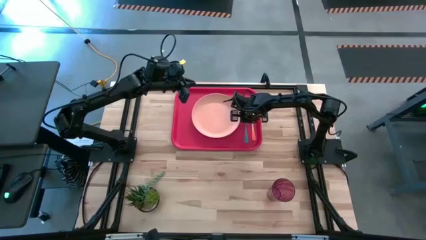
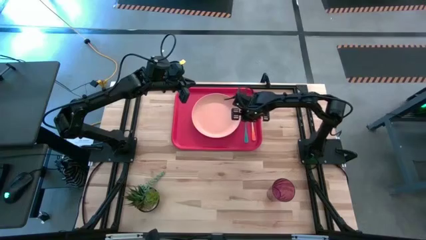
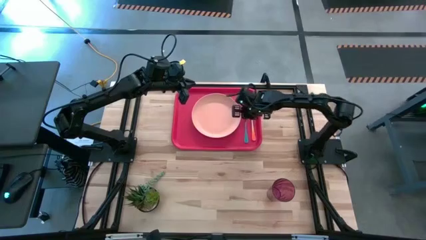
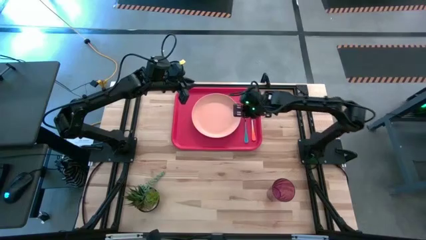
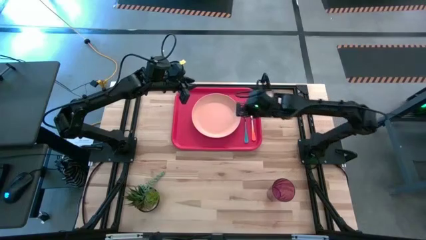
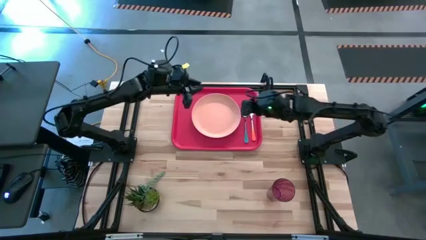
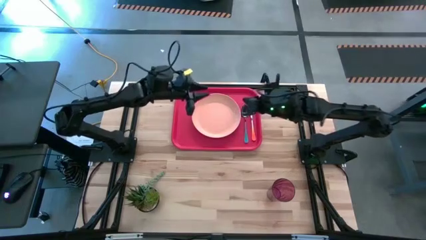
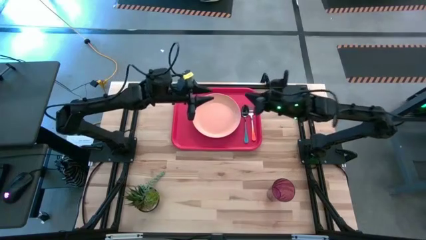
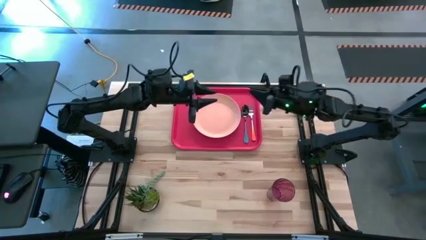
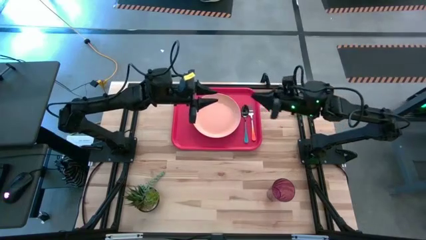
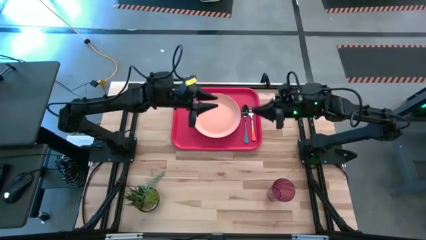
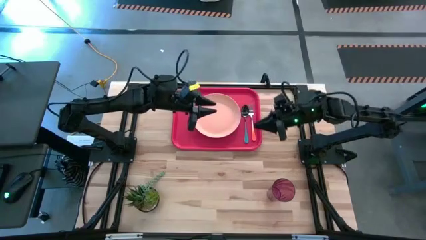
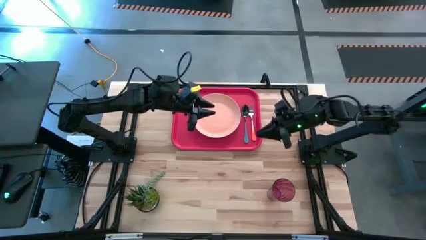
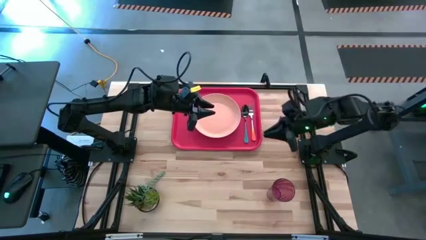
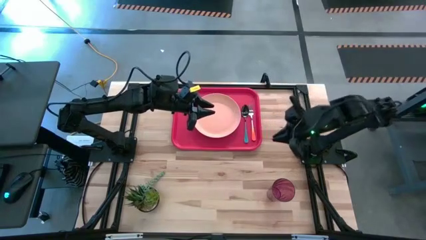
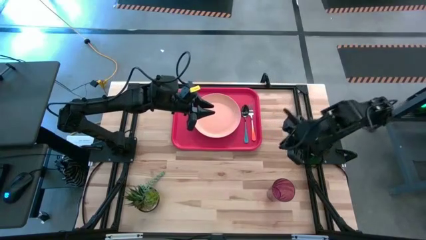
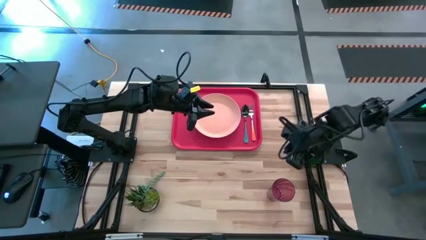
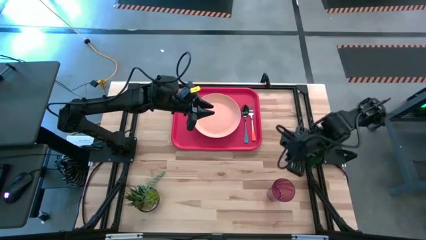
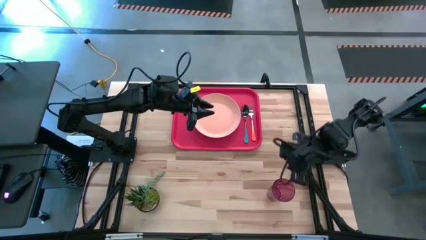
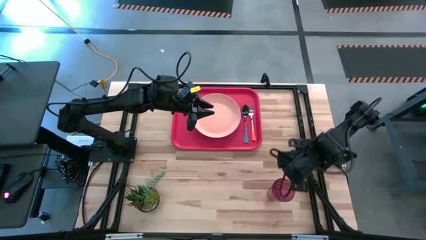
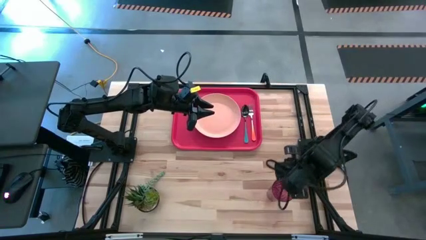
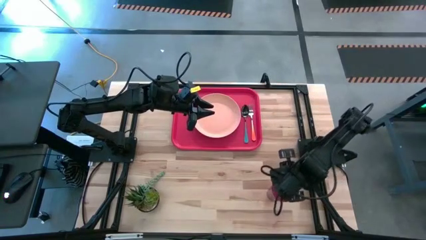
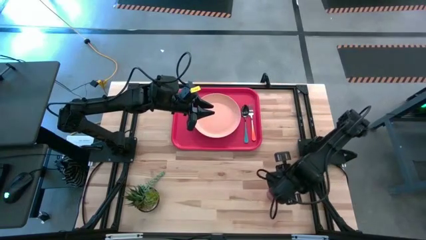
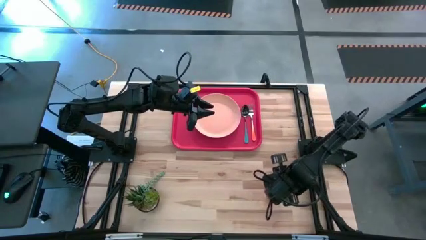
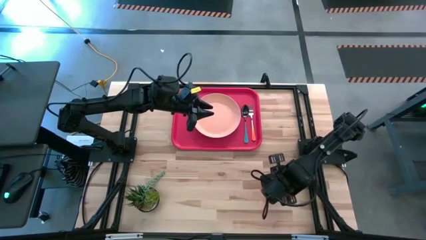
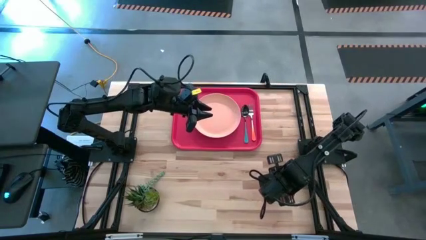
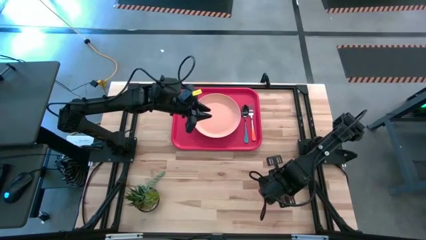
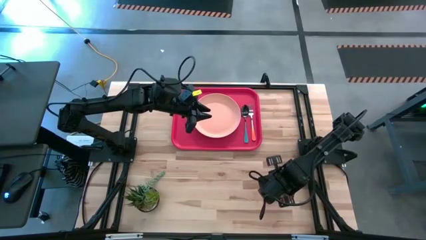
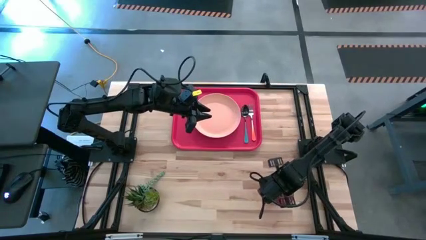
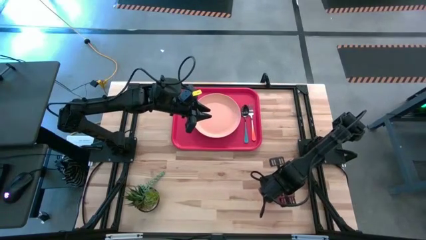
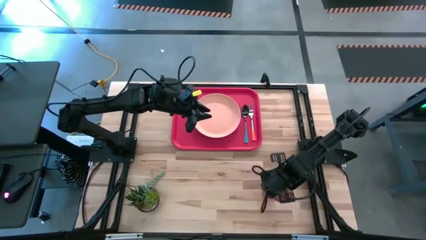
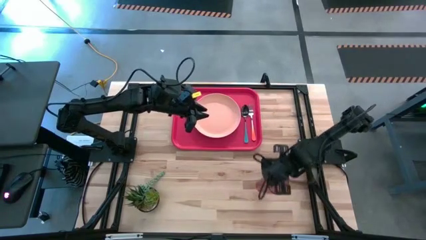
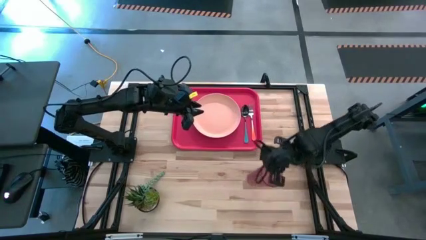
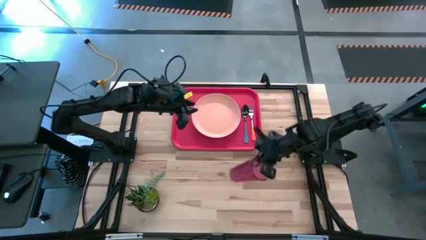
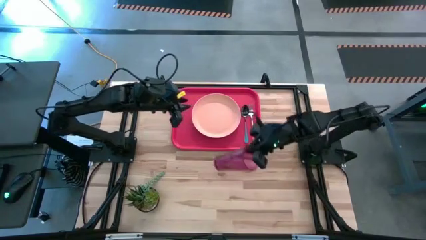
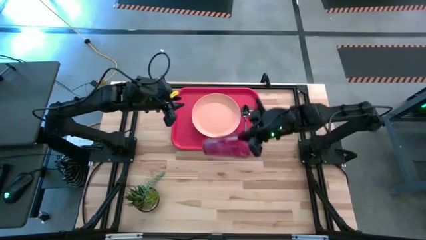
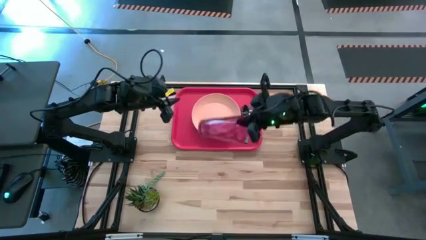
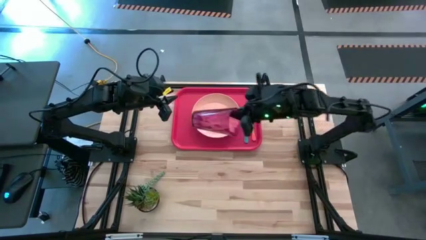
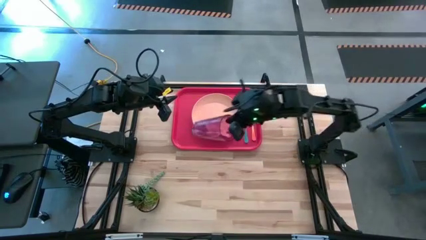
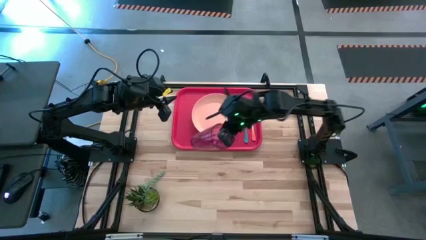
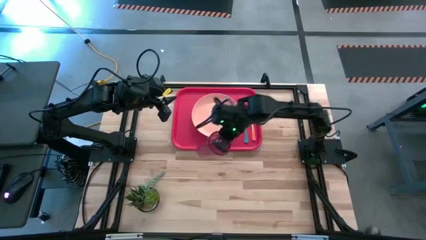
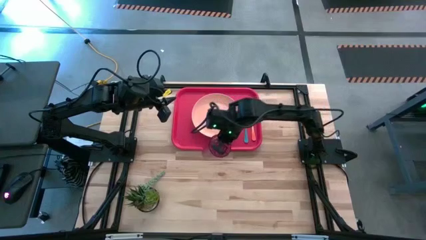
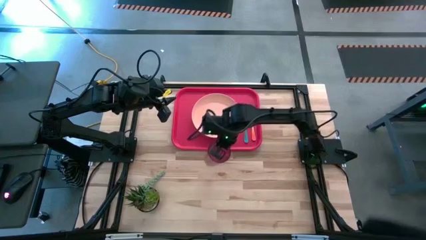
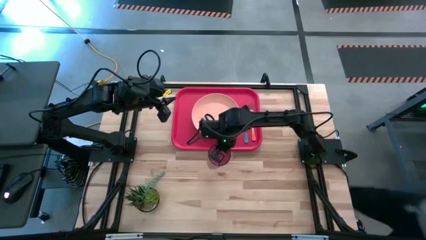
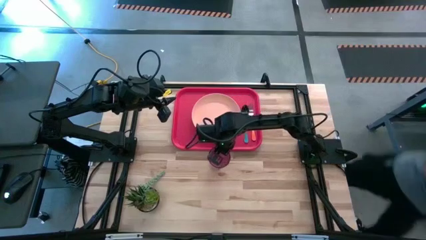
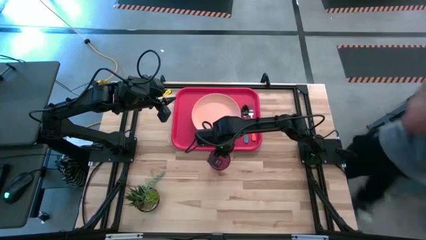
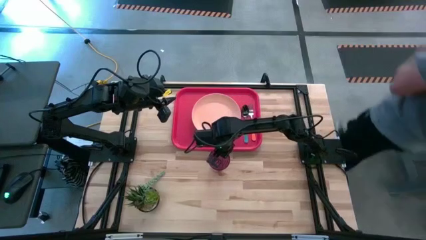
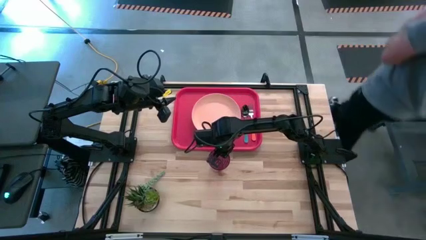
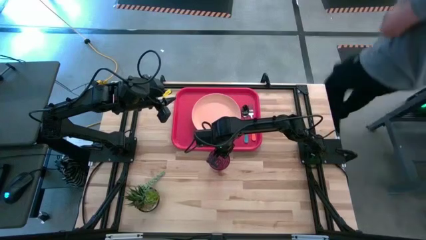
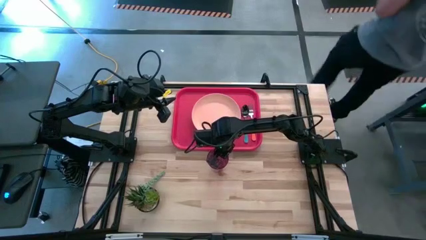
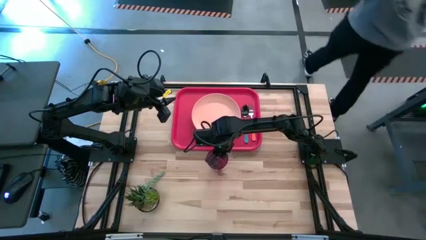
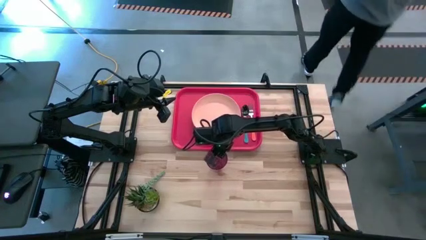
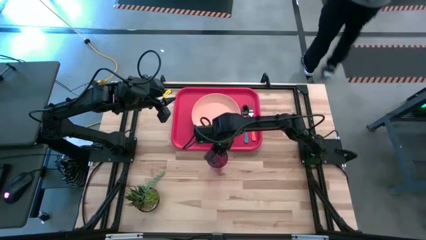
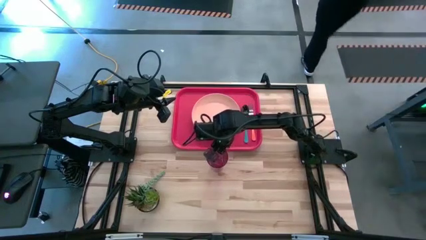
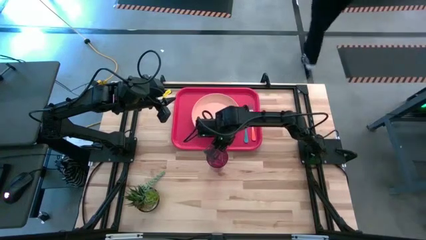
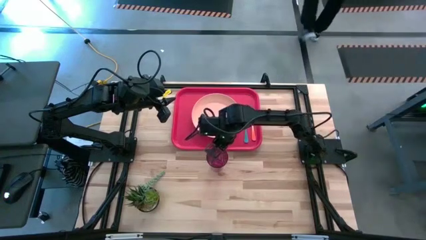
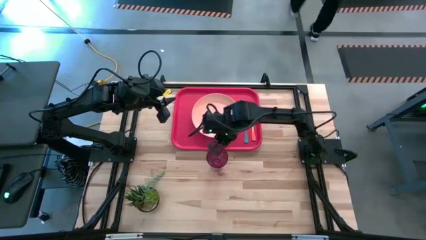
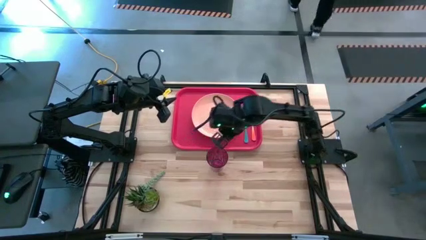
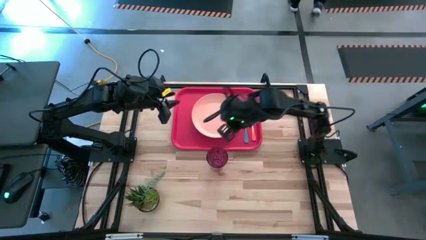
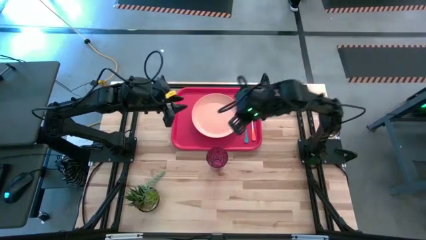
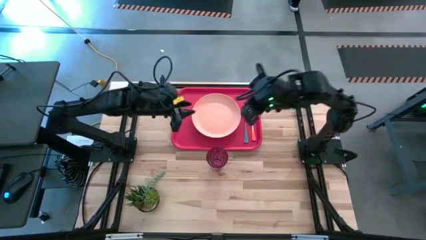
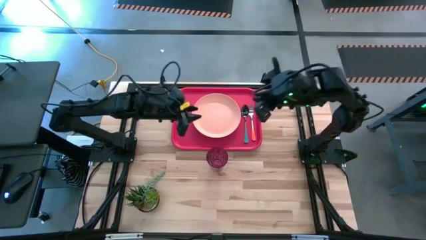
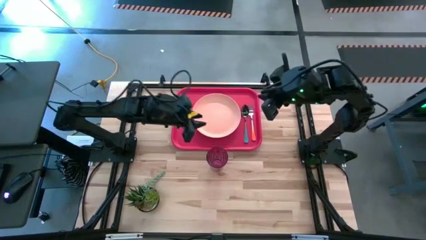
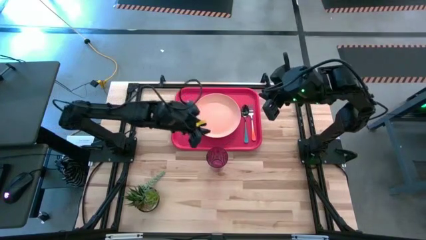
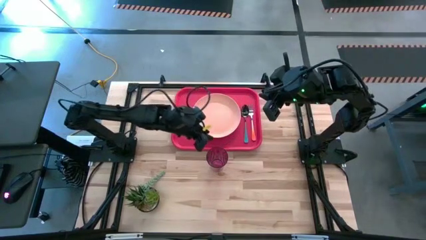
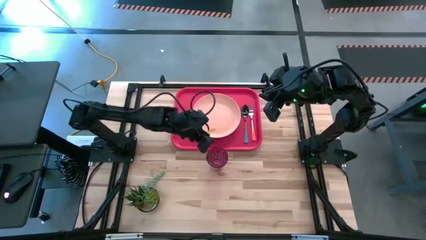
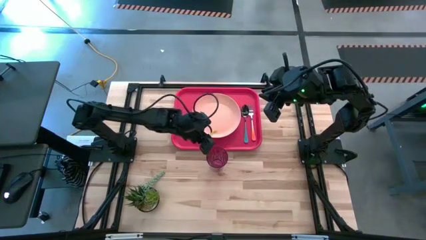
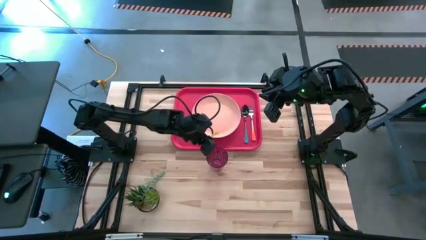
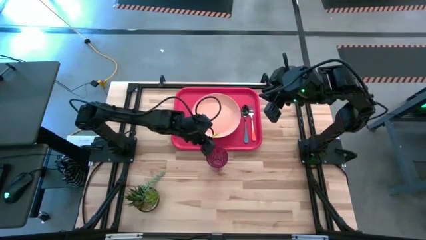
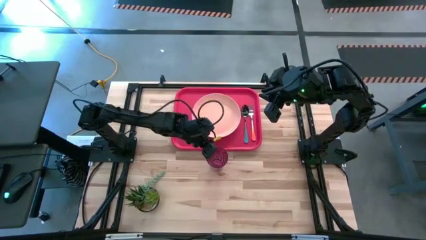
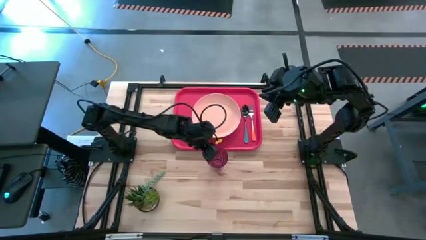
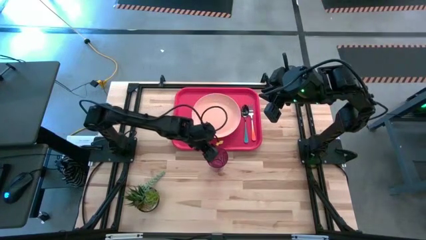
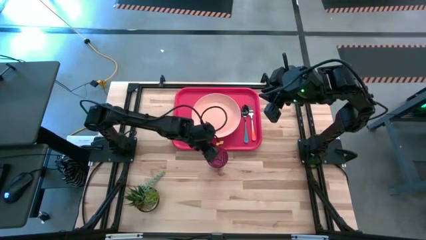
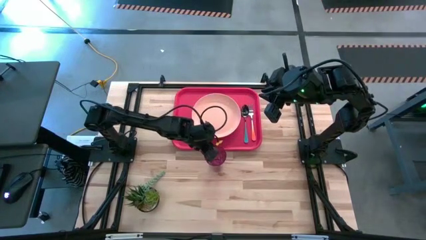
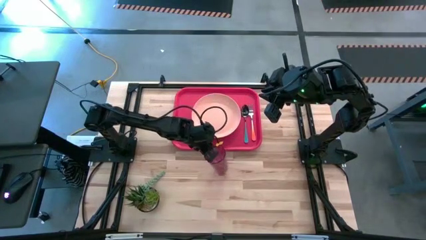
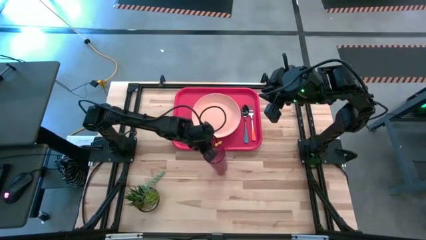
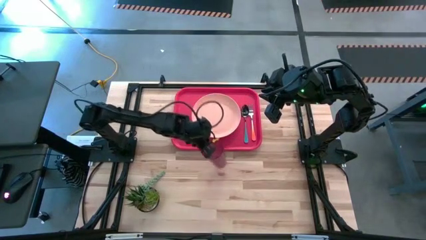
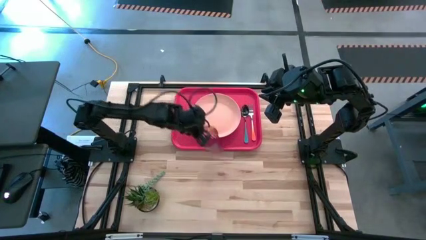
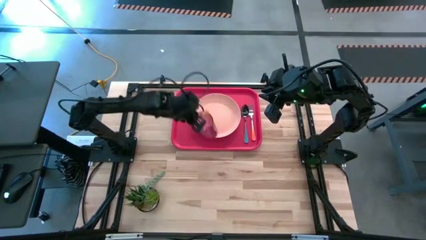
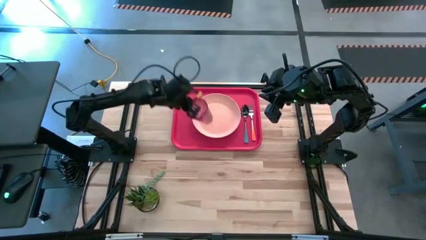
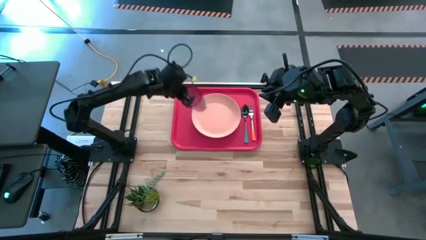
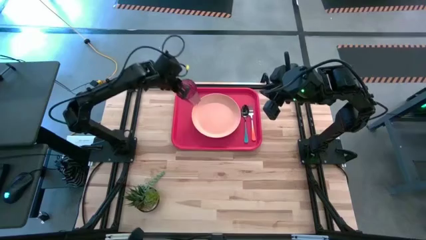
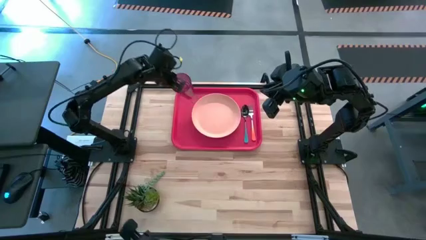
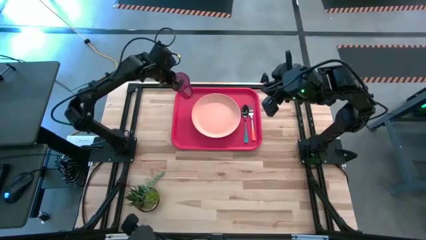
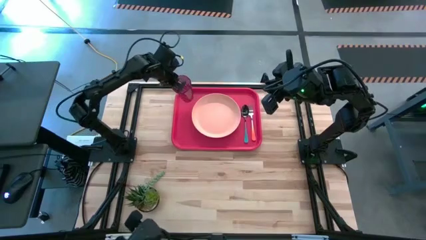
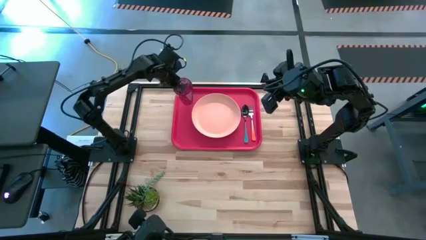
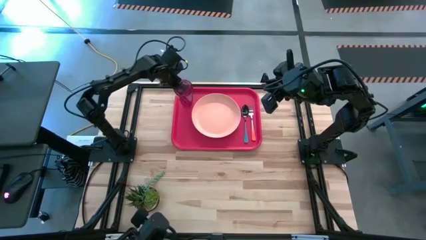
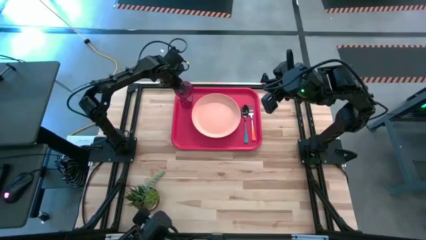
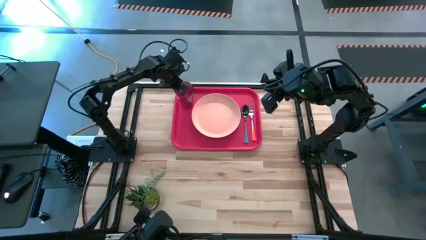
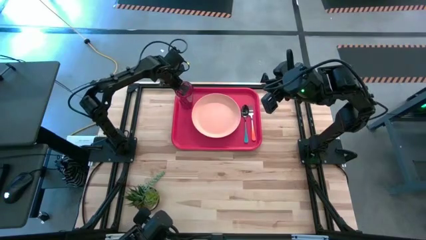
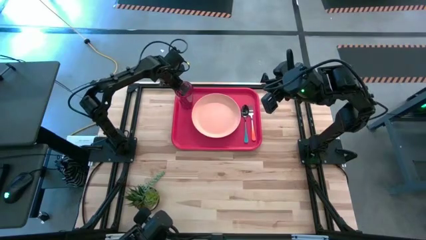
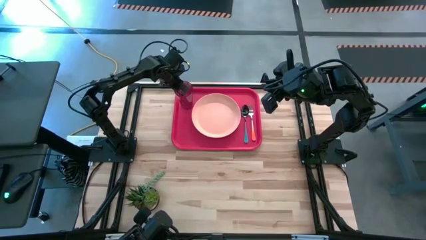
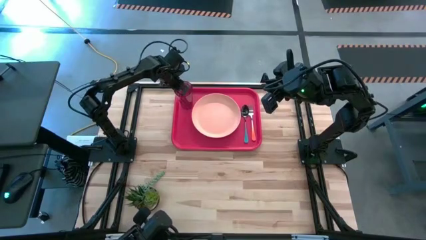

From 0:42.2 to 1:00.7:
Task: Pick and place plate/cup/fork/spoon on tray
Put the purple glass on the red serving tray to the top left of the light orange plate
